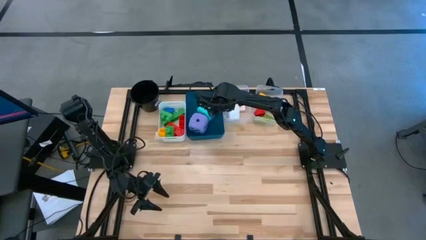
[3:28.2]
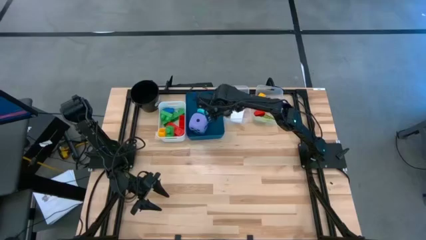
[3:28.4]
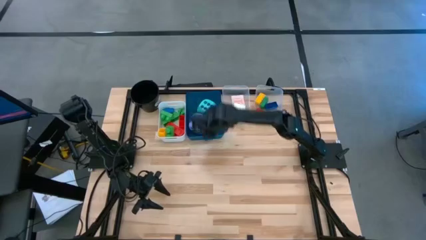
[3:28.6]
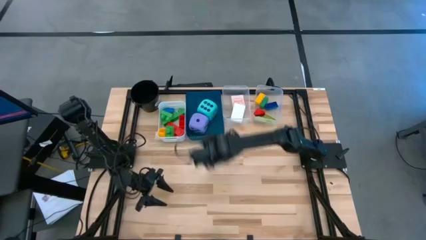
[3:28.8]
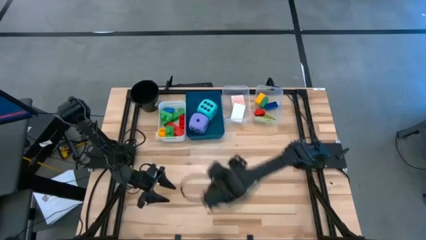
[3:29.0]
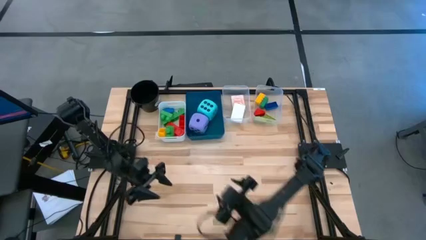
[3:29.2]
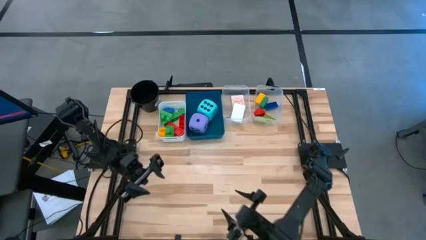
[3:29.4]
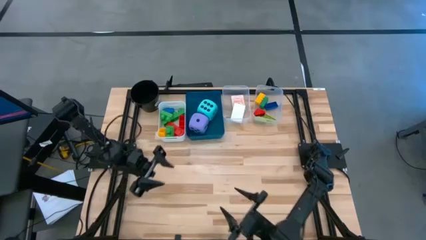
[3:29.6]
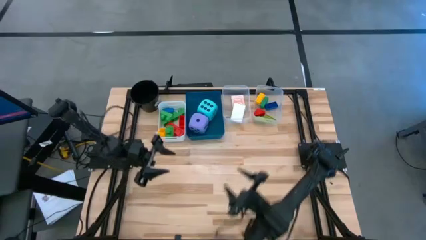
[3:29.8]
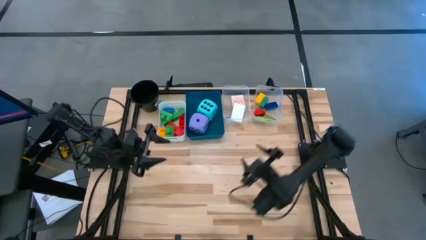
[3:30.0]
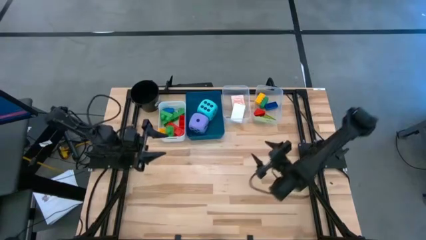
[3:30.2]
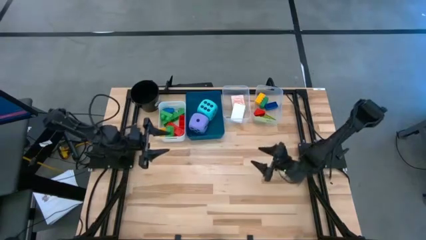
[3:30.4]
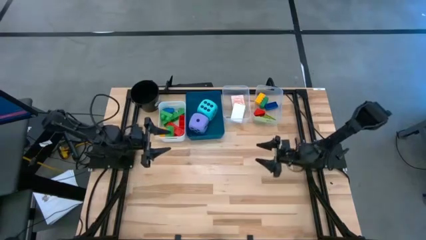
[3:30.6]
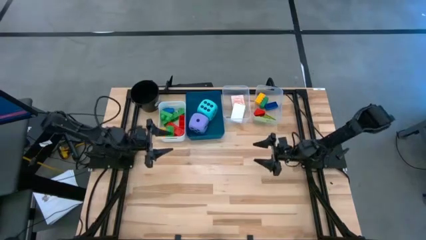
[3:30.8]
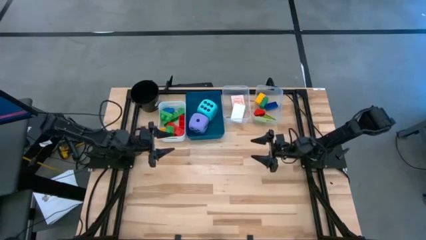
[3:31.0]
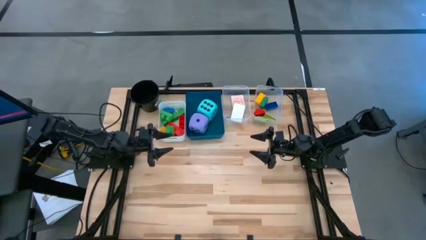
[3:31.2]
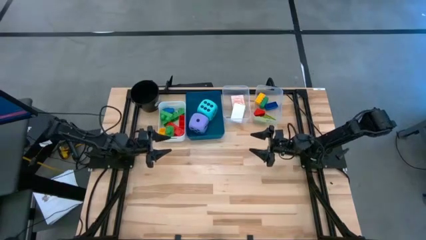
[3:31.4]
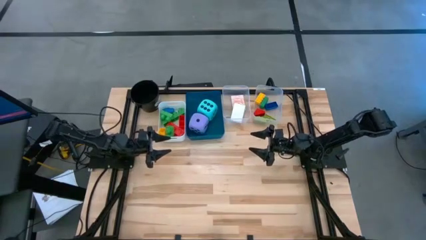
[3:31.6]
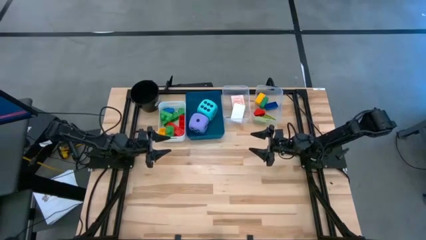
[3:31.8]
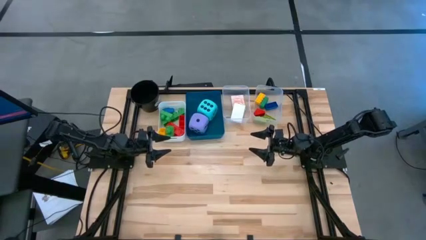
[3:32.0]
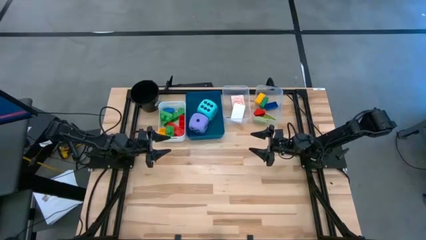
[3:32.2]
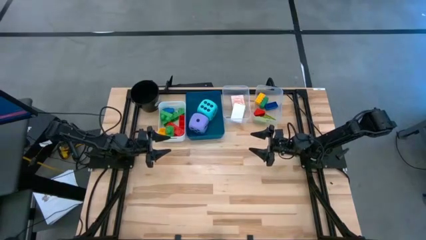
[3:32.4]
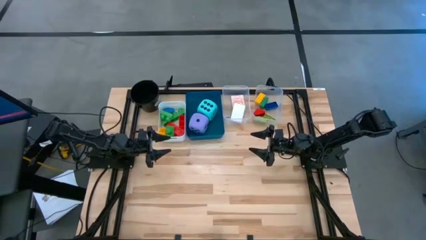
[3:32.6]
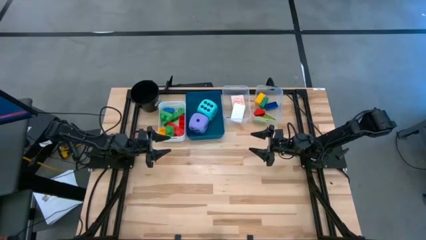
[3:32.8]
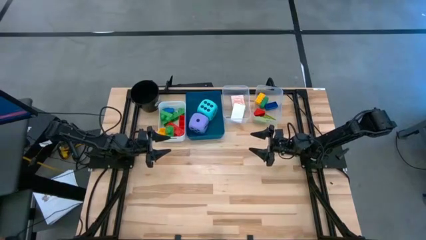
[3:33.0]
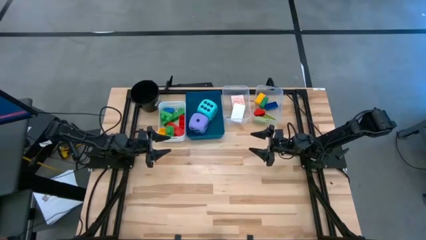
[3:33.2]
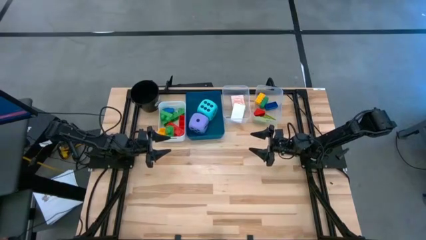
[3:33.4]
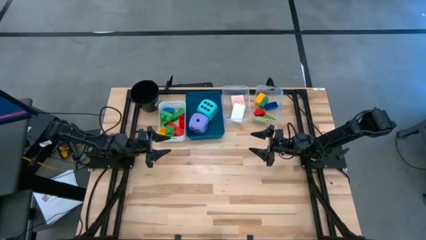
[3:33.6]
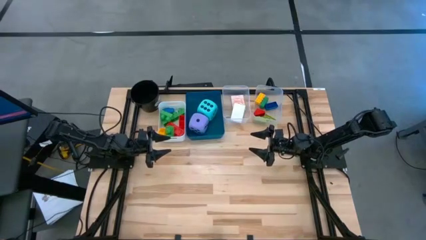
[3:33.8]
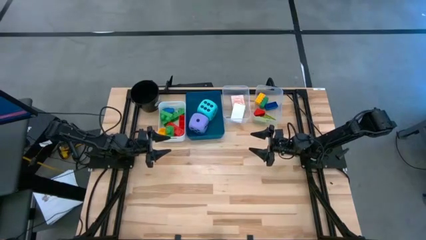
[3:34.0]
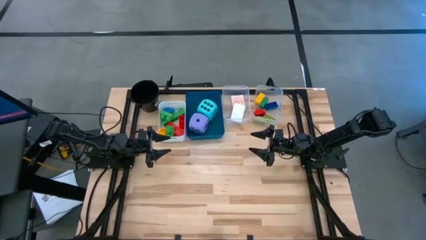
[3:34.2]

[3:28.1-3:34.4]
Task: Pick & Place Toys
Return to Home Position

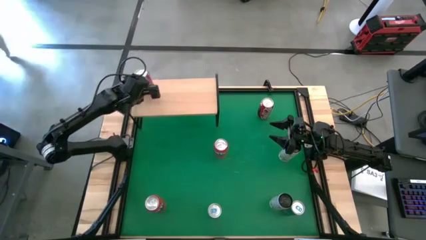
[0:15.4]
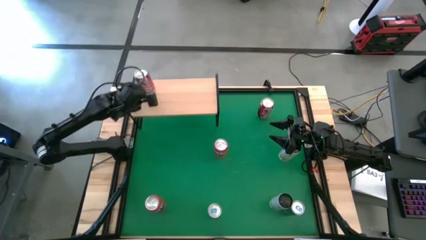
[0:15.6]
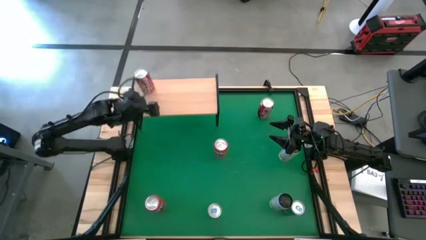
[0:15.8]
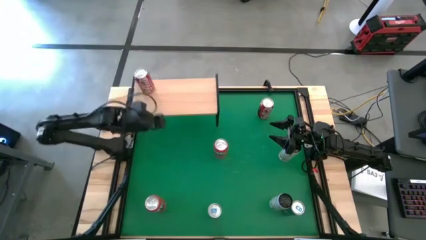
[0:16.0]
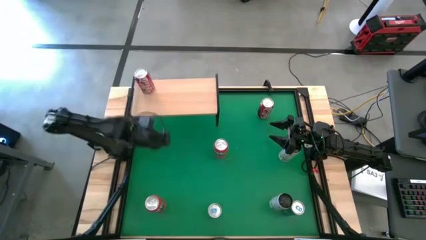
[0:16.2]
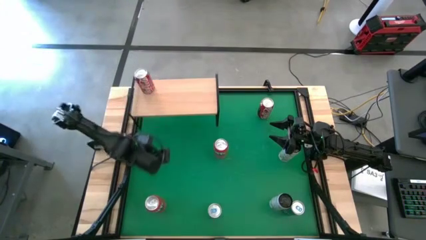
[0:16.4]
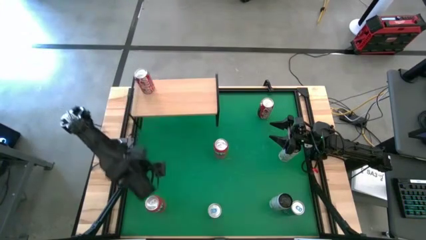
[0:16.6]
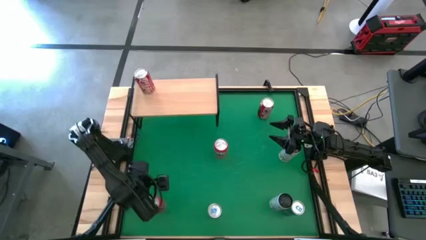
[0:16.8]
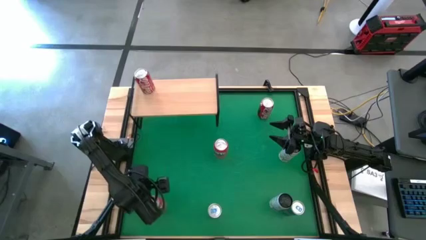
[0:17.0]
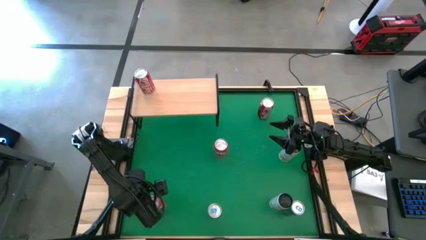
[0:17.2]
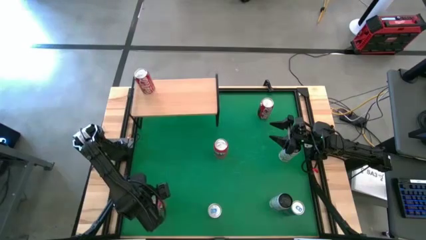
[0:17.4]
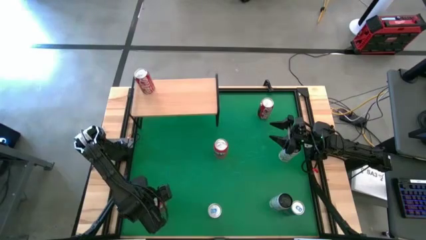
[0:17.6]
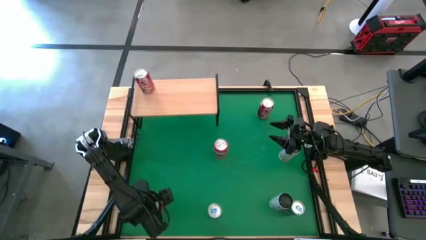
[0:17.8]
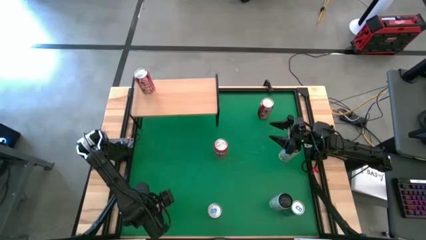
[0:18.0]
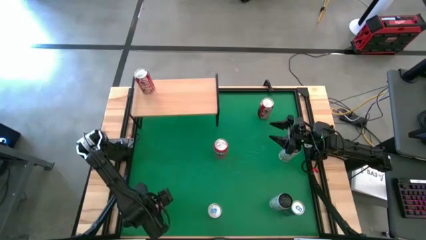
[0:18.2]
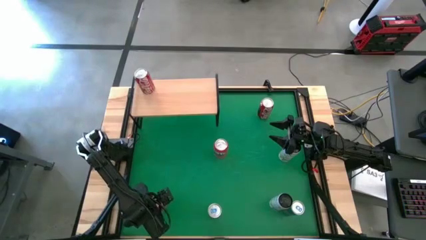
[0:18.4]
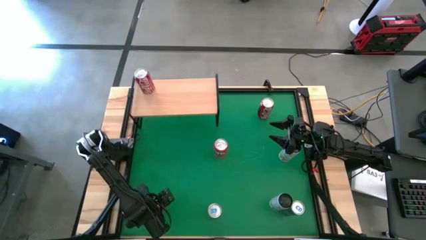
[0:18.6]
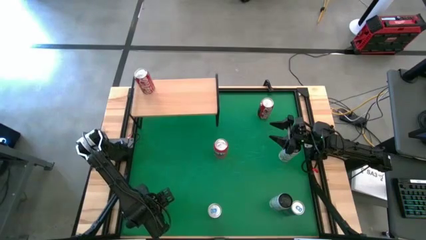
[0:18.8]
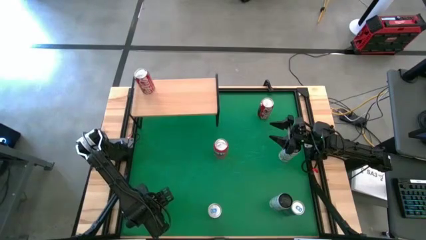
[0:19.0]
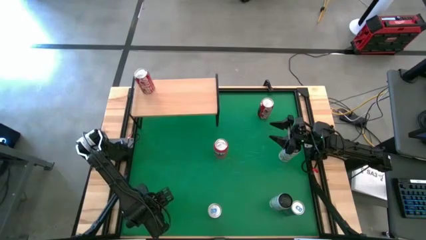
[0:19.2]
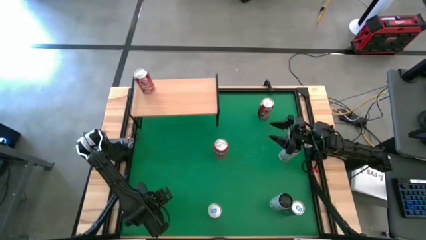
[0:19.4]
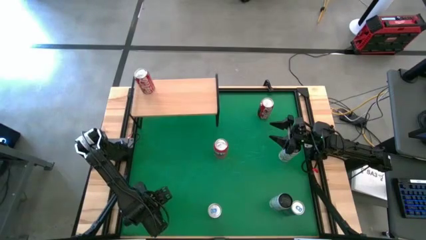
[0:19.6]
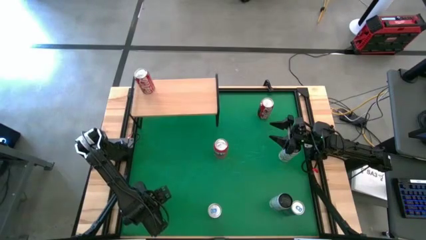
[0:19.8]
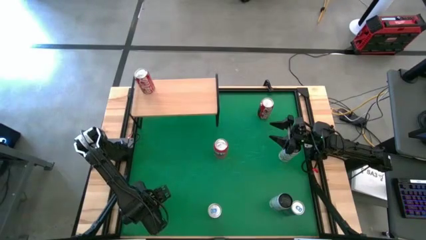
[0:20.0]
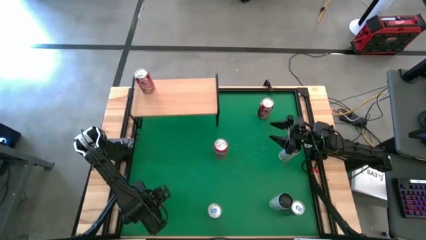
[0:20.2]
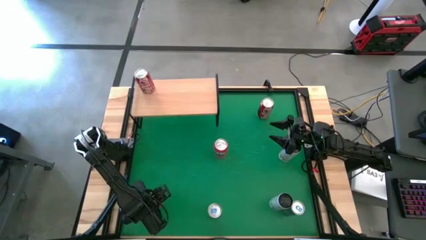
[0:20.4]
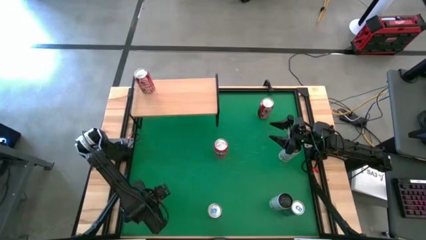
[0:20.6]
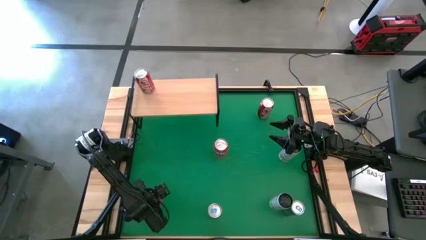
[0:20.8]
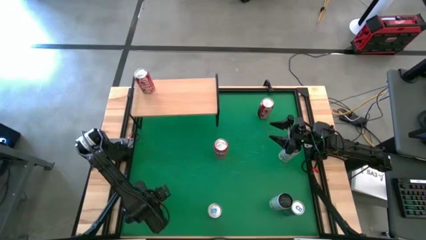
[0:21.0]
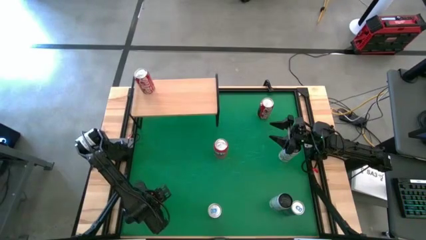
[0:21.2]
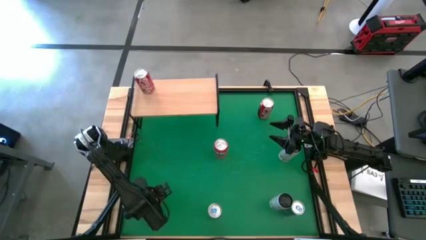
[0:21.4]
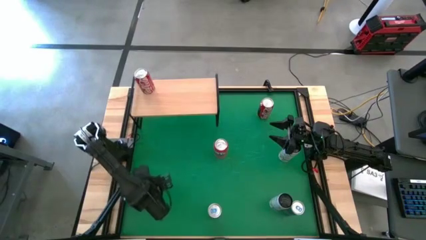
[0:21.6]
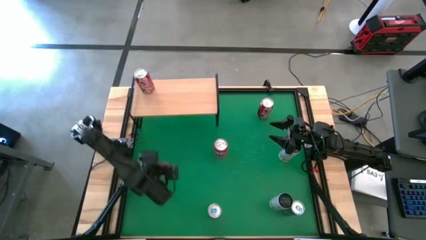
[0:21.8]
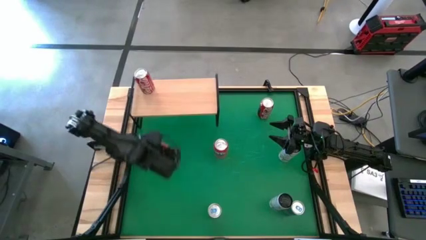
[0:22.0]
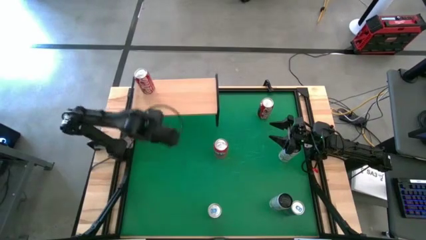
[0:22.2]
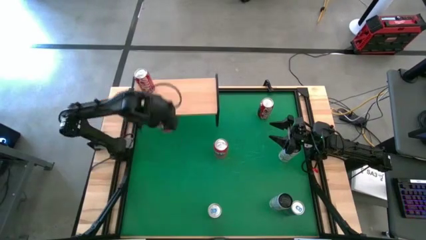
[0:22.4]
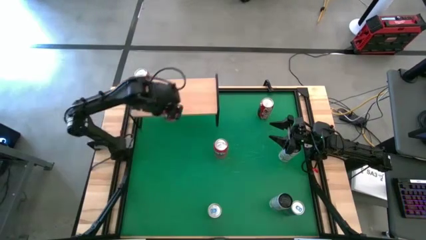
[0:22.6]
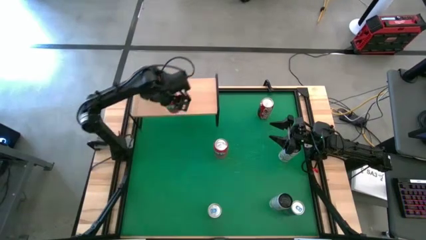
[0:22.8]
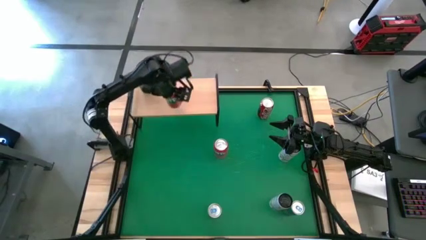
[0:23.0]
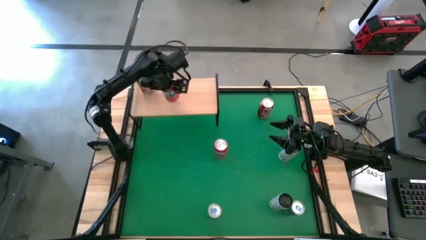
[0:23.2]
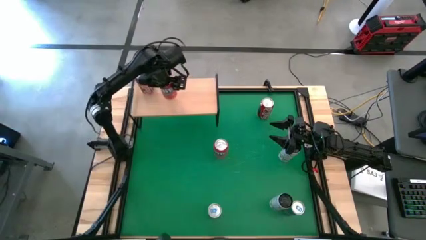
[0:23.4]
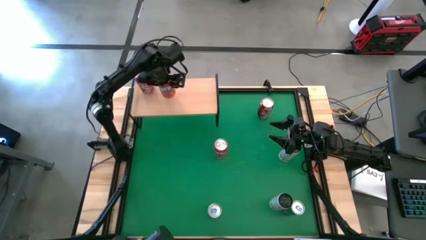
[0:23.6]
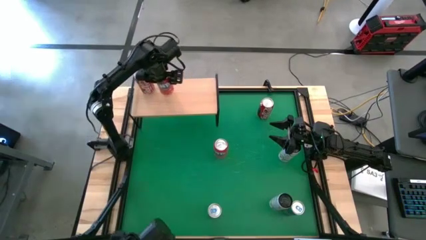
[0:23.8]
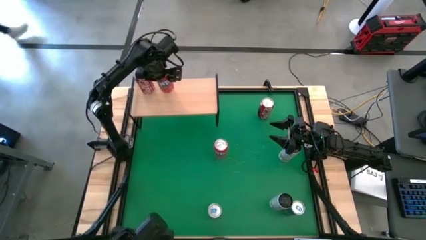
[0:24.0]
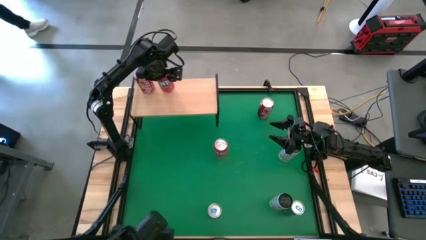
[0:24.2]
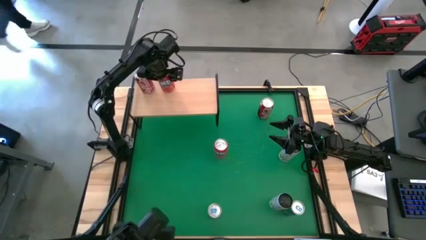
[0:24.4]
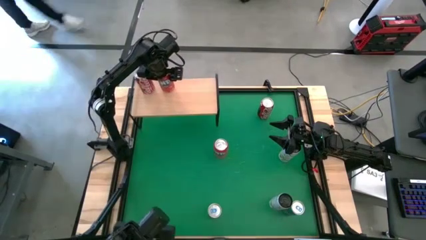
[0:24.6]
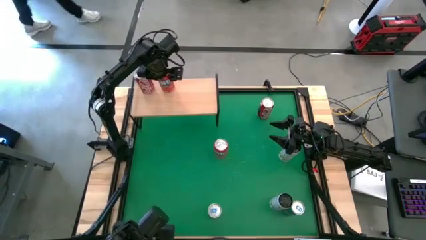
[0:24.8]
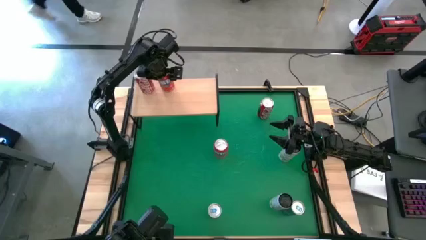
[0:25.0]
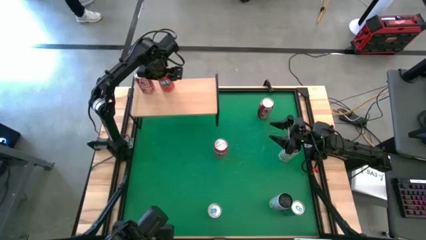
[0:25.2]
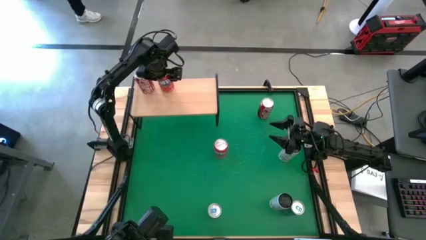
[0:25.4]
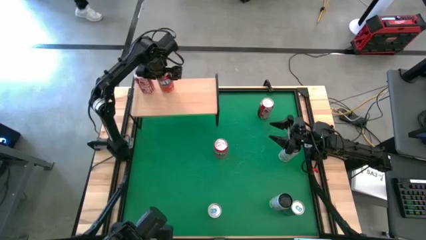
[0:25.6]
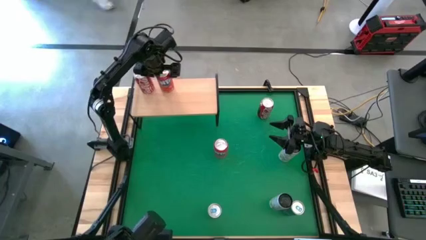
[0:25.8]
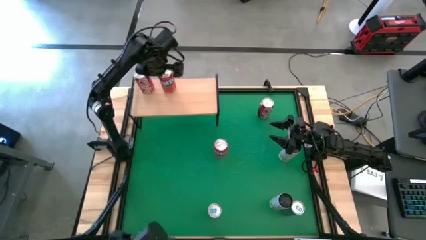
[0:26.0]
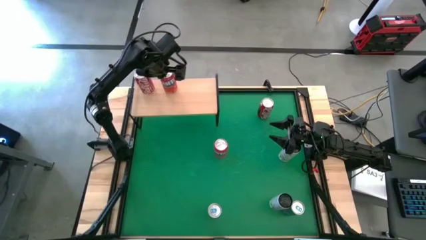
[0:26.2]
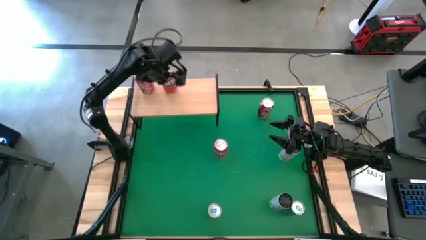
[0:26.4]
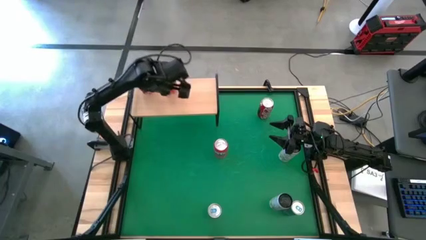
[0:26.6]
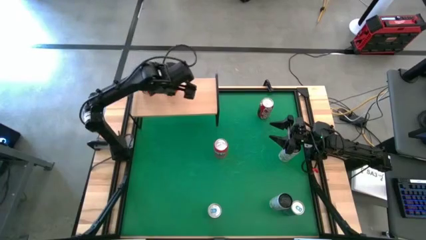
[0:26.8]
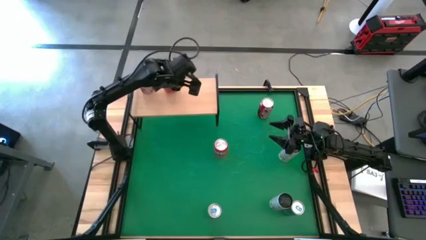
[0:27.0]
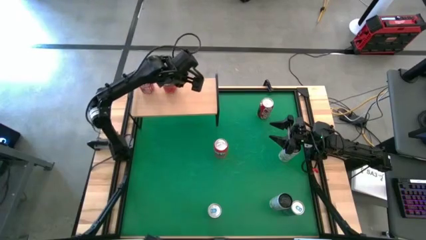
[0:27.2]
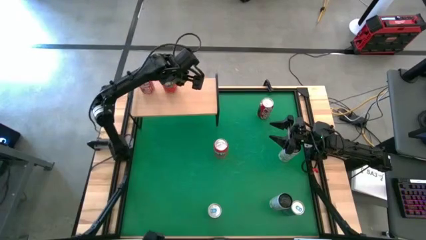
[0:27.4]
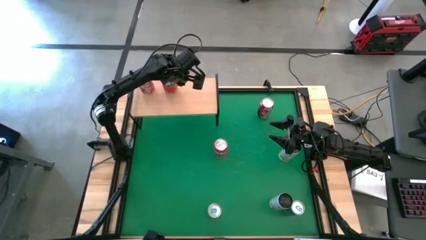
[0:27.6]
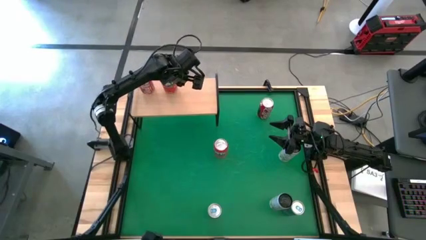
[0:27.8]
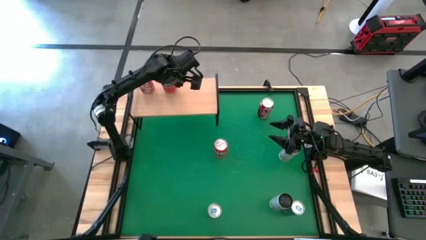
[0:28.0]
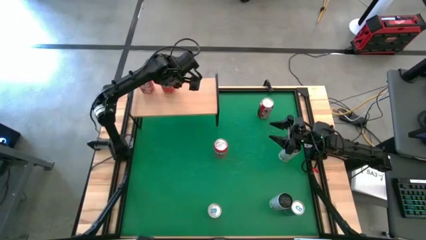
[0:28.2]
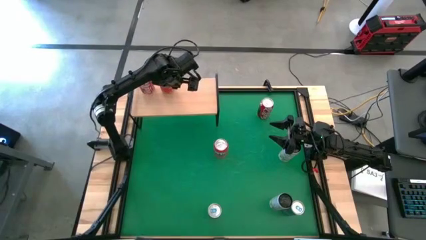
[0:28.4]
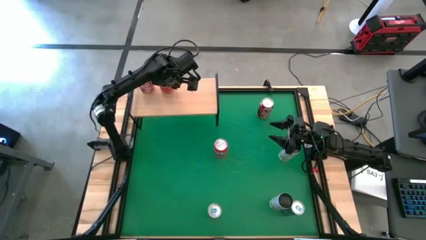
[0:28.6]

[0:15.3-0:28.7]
Task: Place canned beverage on shelf
Put the bottom red soda can on the shelf
